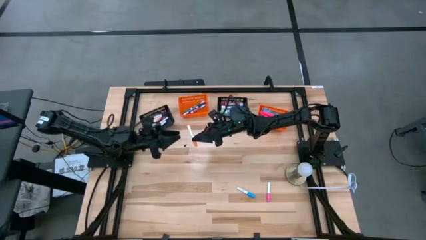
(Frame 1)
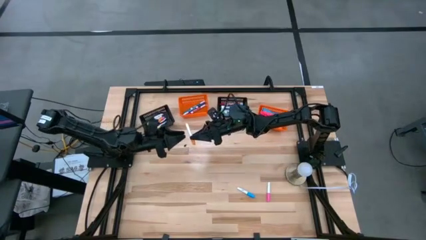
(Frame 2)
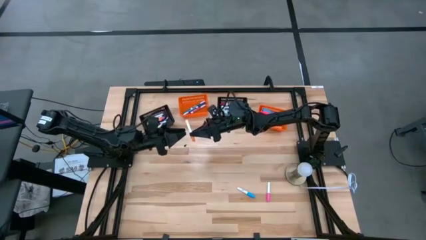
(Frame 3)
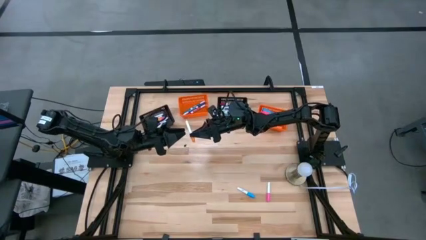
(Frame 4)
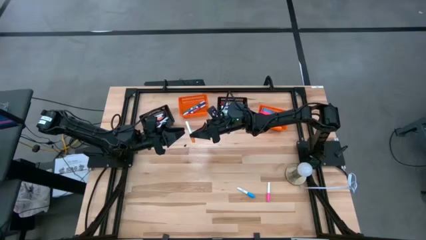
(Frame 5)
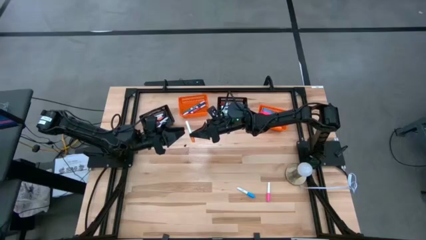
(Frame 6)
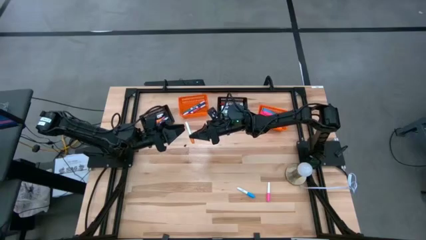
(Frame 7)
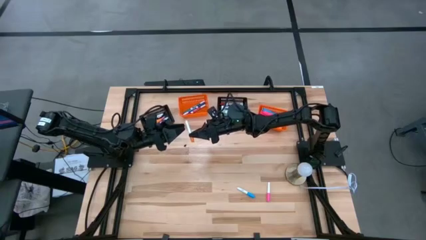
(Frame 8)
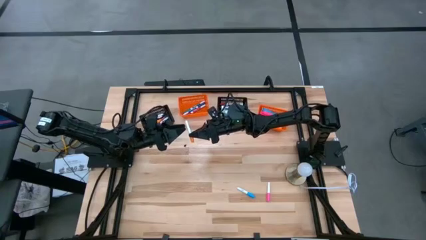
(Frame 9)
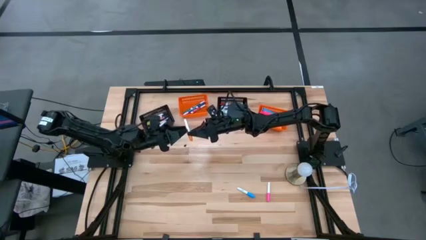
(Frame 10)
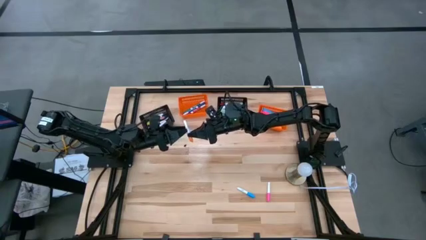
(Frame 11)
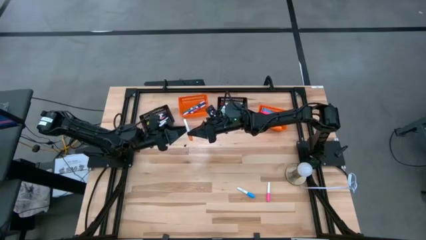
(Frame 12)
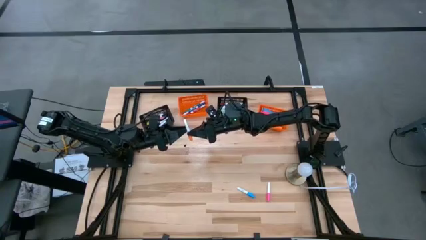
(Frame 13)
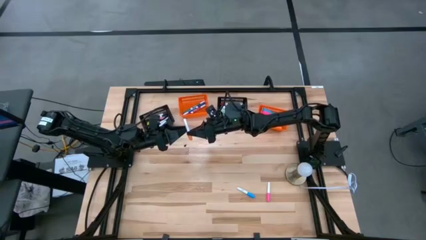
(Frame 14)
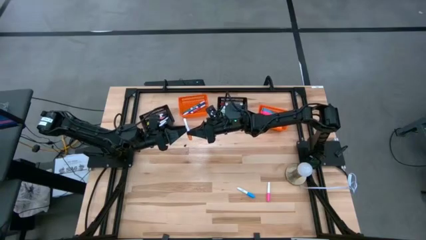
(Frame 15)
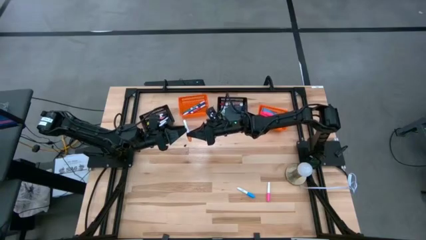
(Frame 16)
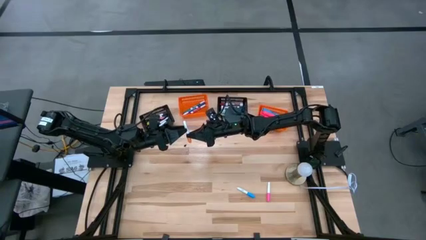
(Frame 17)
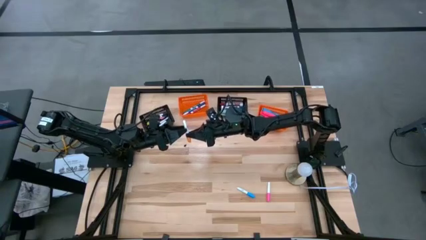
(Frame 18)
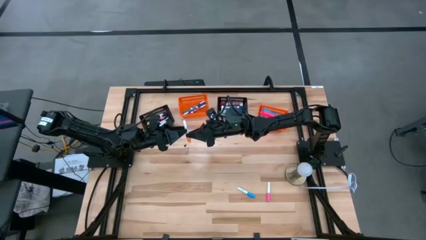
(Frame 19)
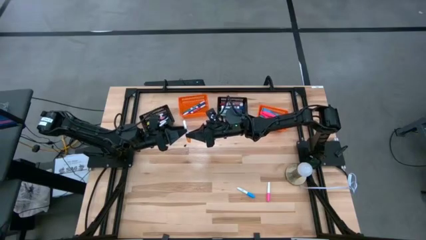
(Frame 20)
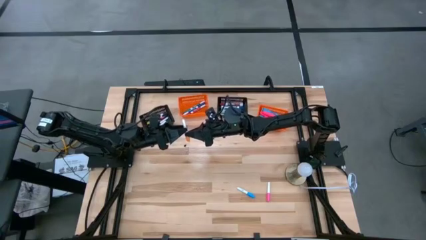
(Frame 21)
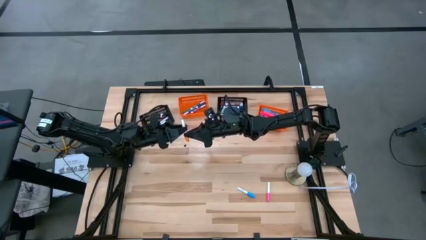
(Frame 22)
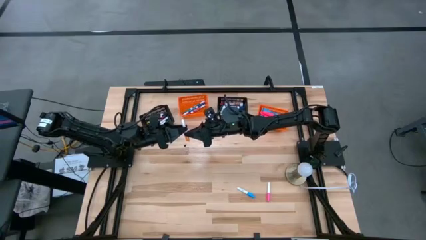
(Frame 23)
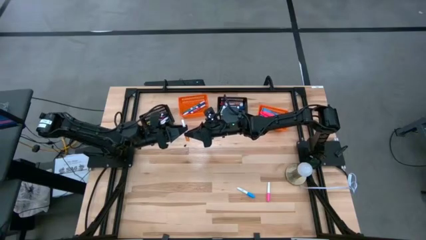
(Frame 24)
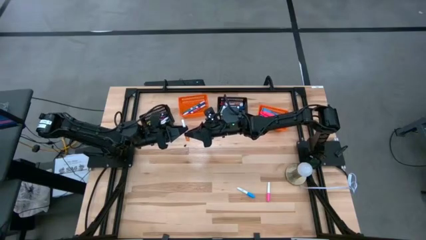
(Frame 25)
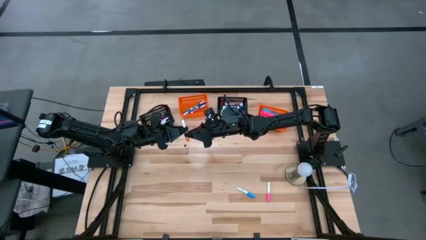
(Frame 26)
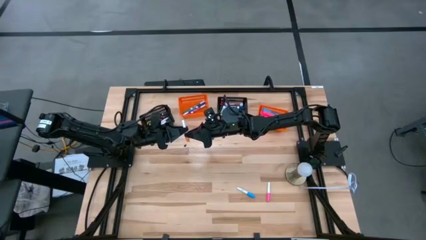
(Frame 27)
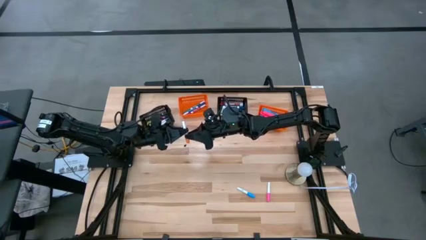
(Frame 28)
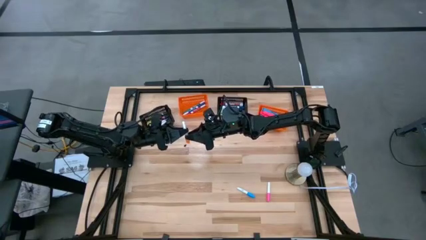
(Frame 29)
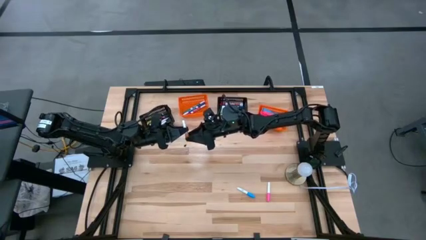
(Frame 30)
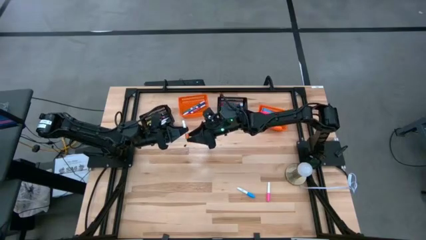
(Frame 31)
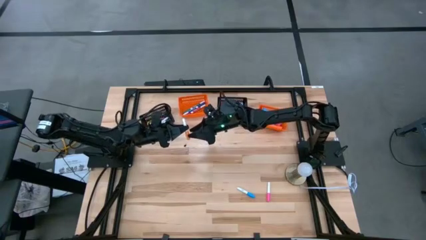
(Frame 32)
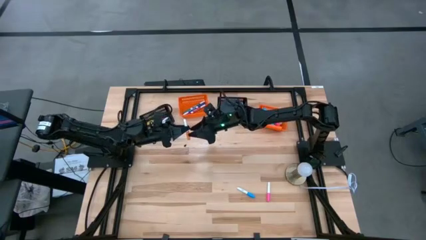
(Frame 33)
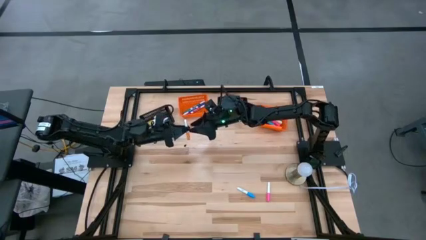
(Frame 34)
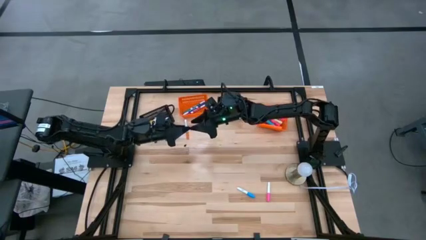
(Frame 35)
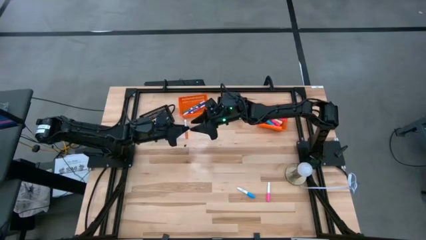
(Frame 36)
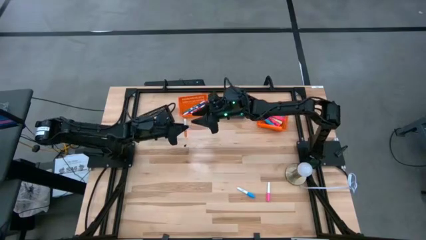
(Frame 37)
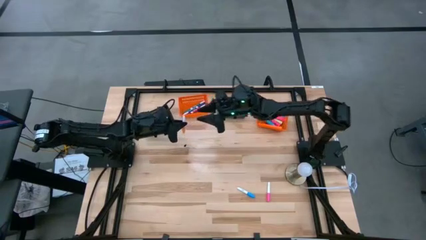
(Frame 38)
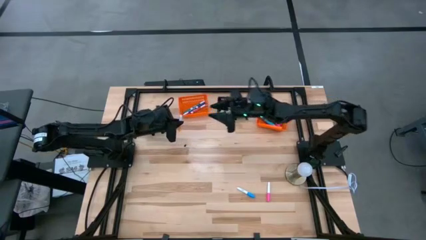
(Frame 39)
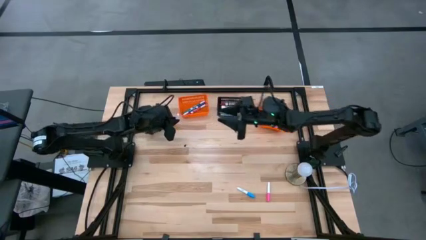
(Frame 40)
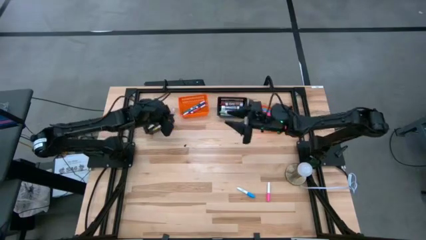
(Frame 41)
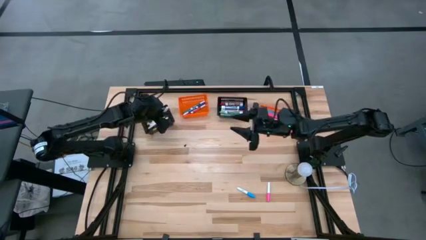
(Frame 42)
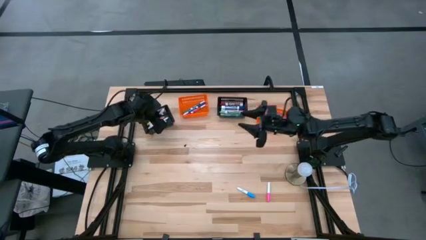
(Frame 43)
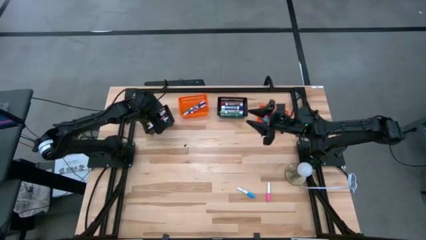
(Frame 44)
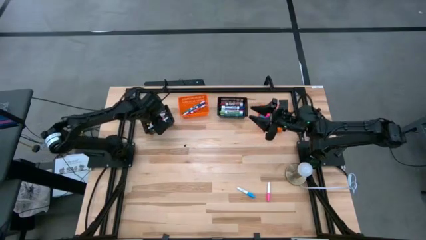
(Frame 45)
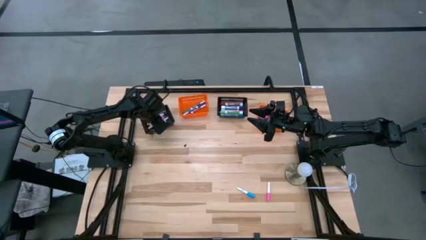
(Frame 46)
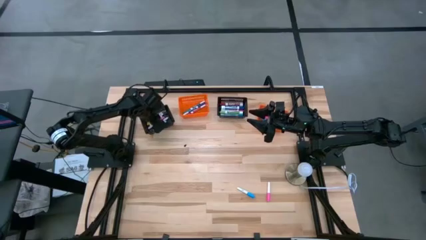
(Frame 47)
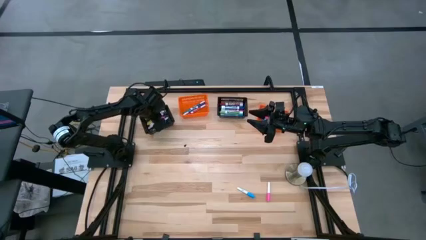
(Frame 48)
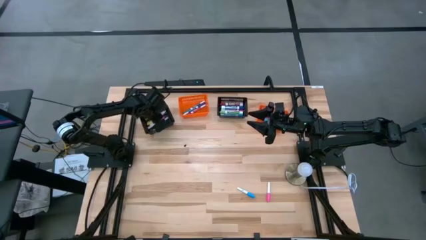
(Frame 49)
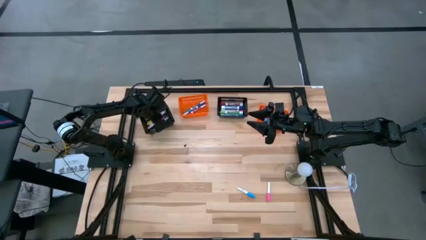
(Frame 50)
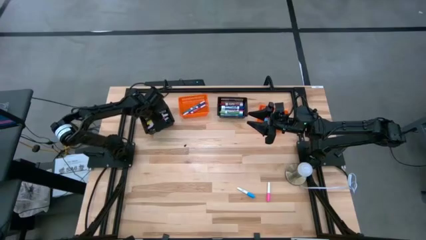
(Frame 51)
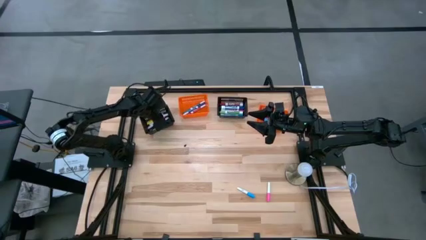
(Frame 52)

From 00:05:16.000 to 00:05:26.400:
Task: Pick & Place Markers
Put the white orange marker into the left black bin

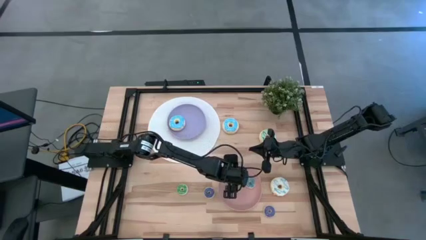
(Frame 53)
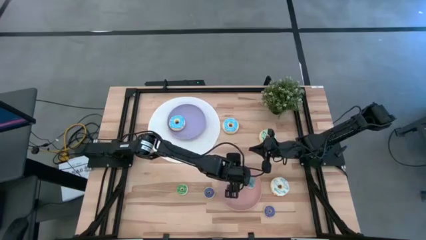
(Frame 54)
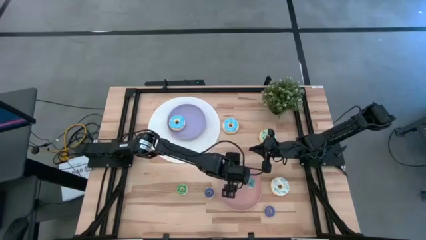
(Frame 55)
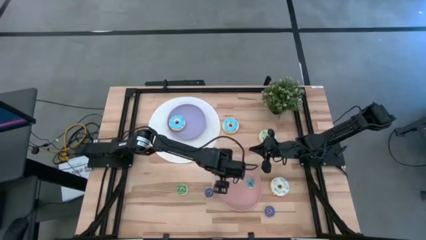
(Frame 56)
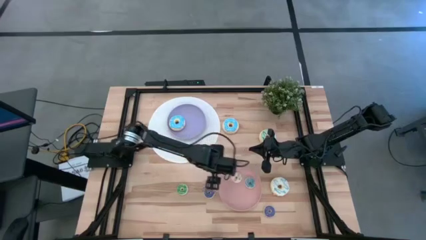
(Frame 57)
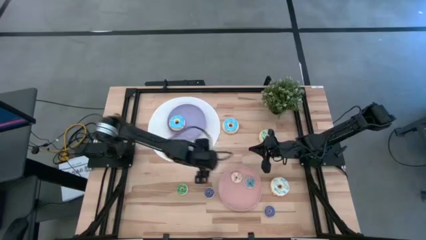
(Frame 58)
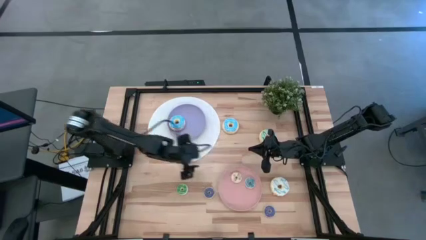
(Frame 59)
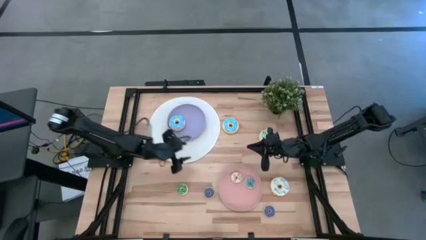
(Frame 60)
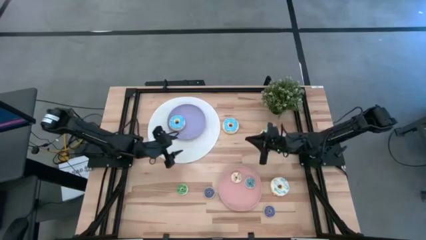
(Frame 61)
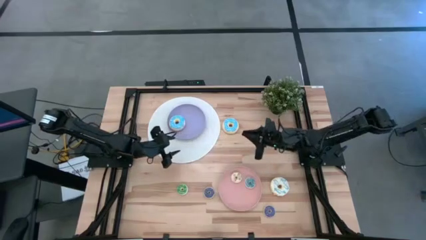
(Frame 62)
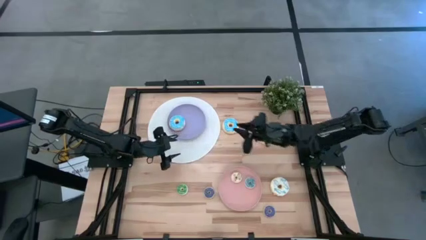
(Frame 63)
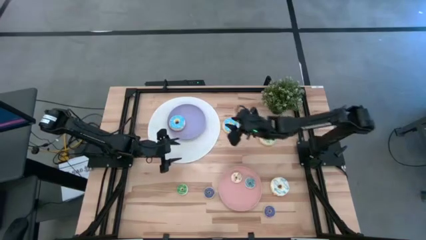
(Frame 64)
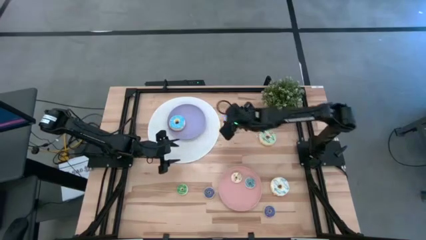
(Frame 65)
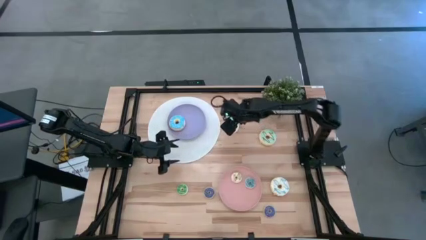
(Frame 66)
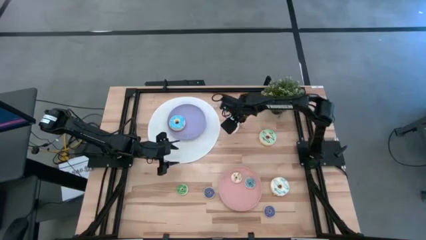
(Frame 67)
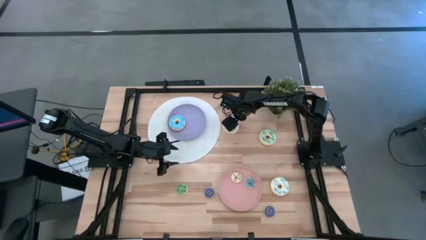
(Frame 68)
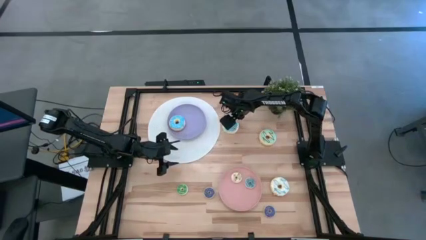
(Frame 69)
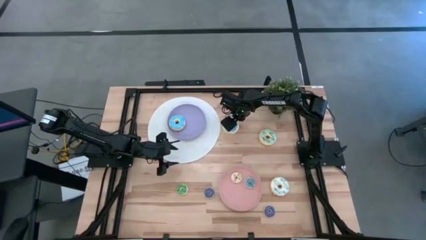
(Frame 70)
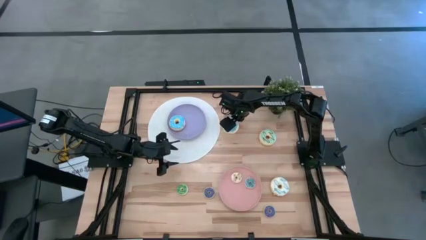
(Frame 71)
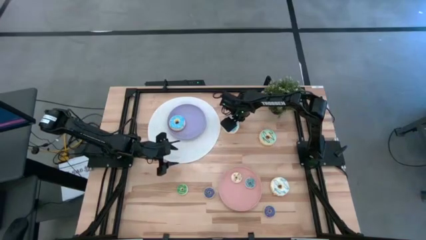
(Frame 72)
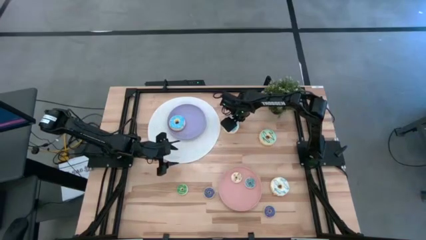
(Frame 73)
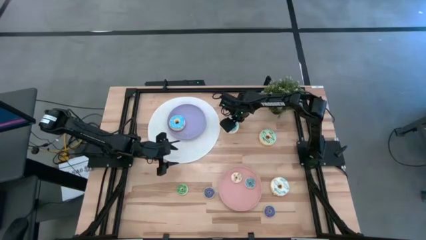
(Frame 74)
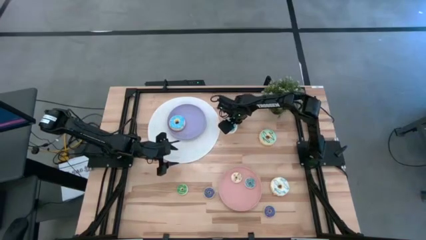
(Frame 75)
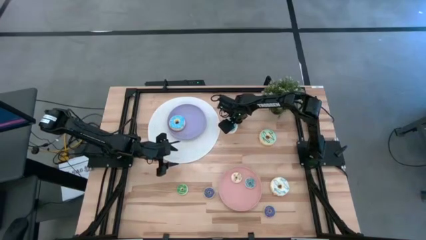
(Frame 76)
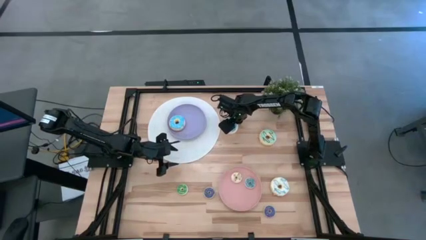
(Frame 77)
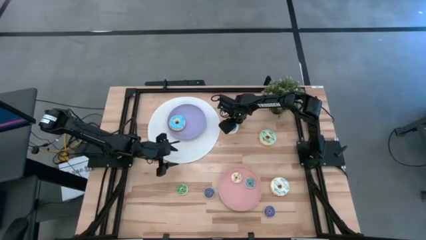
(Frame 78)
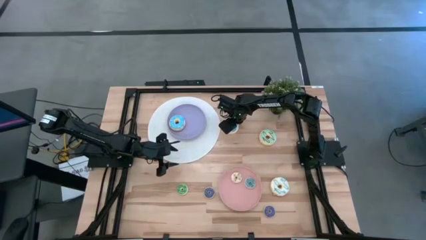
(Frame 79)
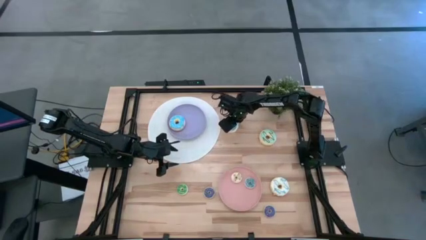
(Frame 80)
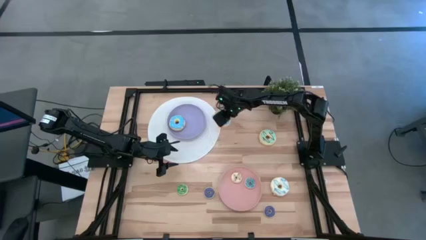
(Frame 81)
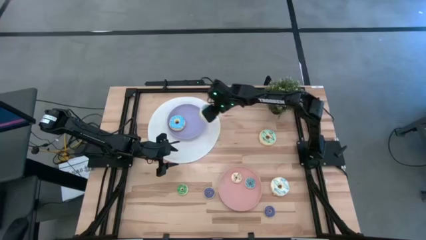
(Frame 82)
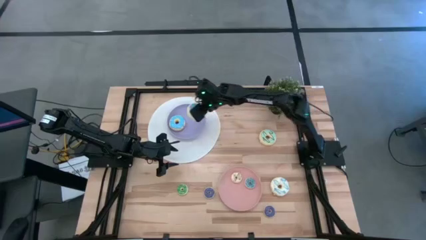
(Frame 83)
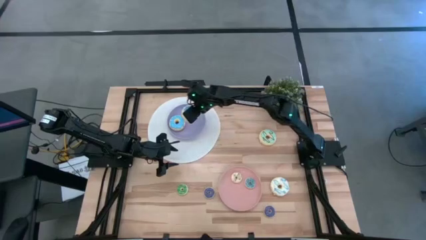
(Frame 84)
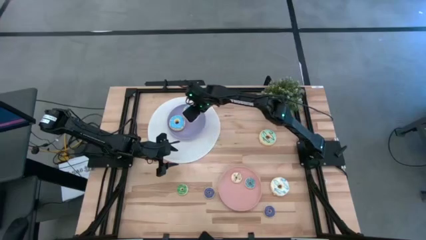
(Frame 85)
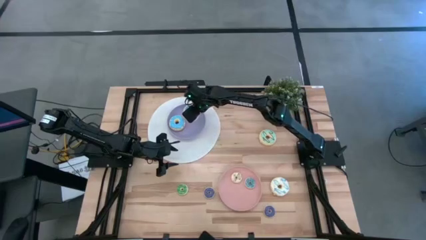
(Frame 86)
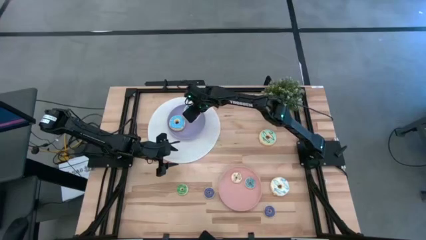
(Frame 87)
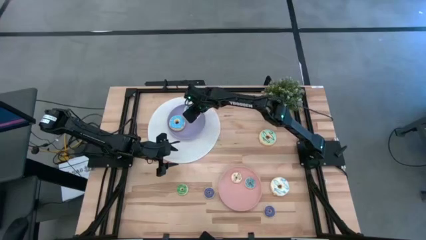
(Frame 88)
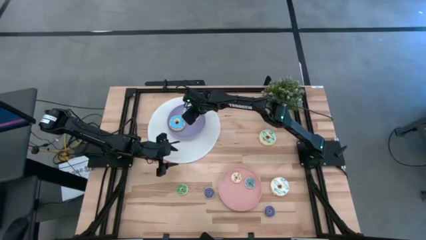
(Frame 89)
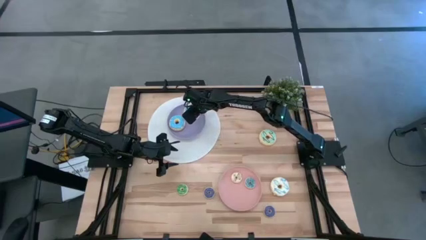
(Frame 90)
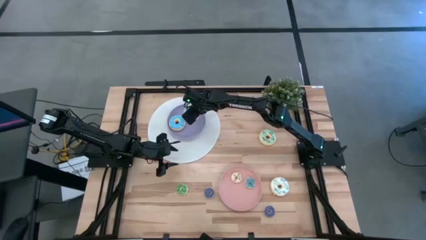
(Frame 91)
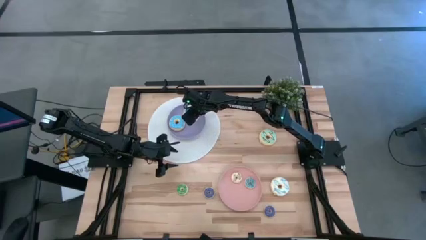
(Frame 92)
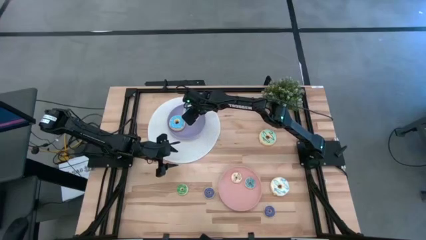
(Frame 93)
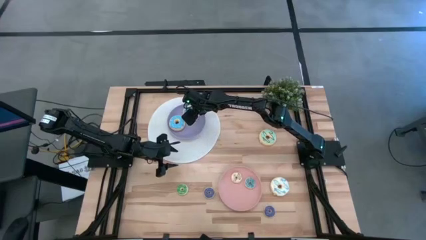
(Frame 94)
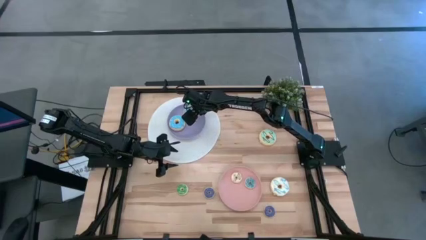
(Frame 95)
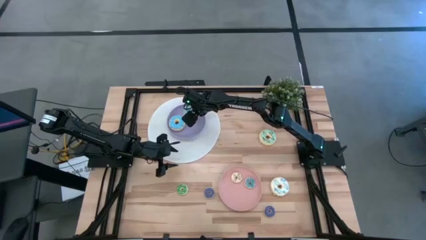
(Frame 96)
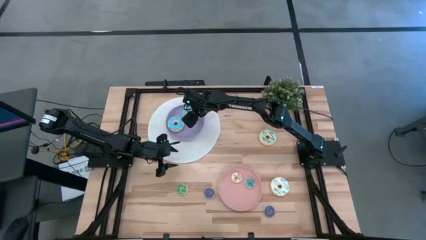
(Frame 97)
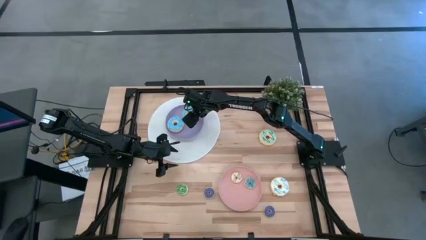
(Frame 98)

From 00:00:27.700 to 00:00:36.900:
Task: Pick & Place donuts
Put the big light blue donut on the purple plate
